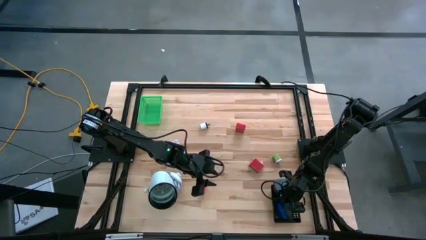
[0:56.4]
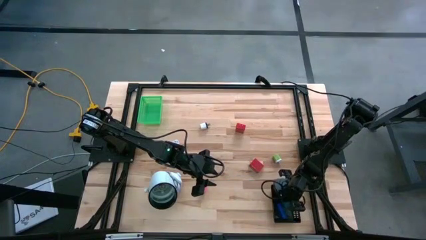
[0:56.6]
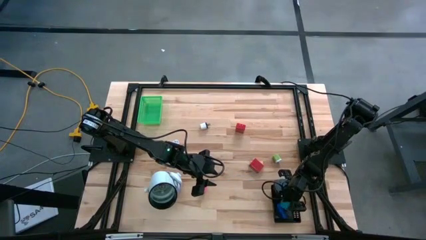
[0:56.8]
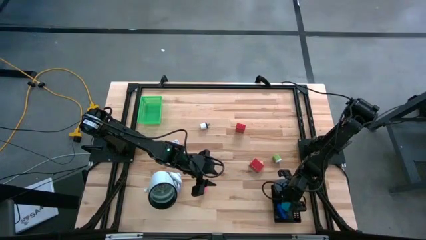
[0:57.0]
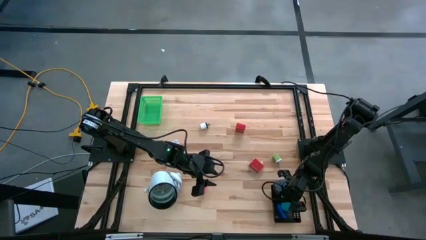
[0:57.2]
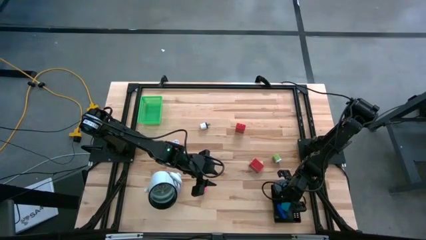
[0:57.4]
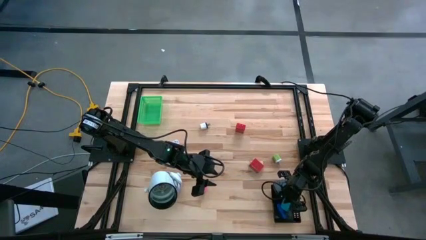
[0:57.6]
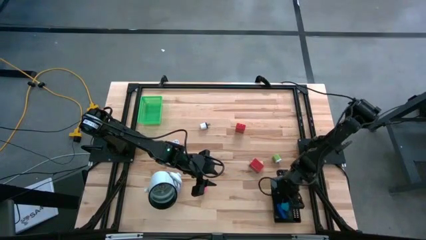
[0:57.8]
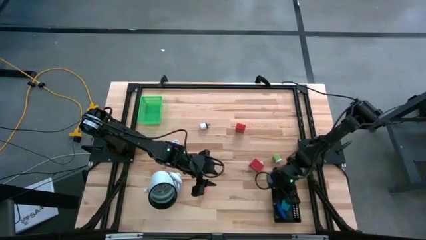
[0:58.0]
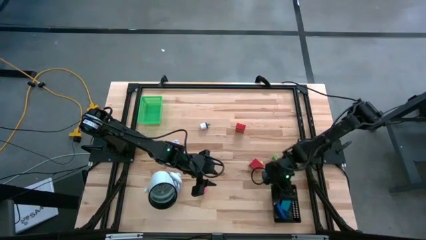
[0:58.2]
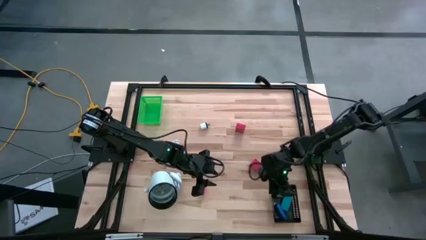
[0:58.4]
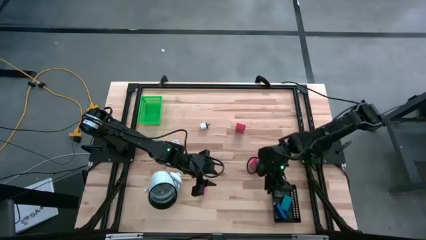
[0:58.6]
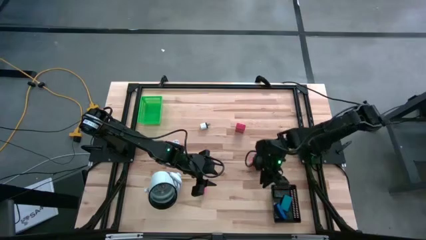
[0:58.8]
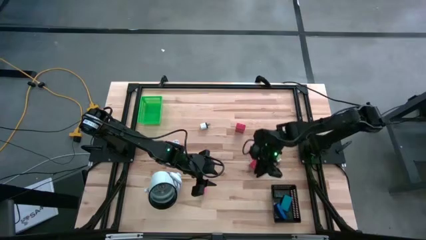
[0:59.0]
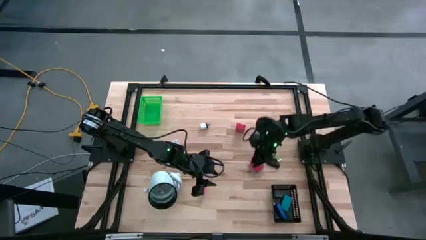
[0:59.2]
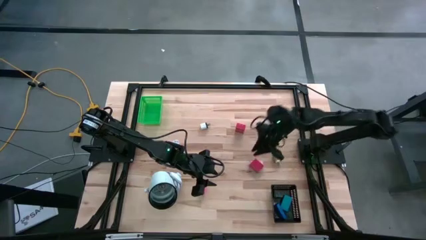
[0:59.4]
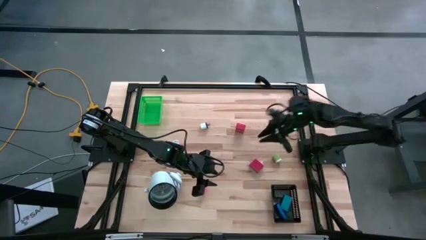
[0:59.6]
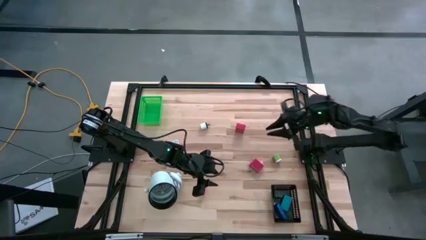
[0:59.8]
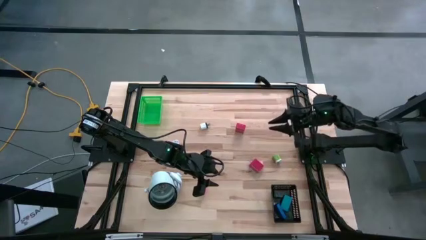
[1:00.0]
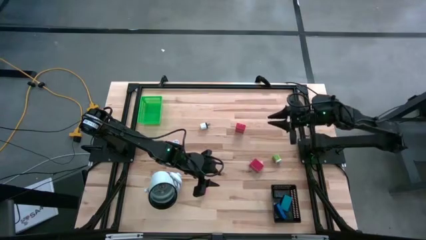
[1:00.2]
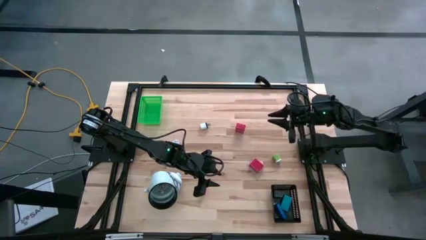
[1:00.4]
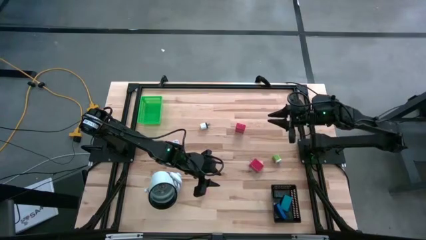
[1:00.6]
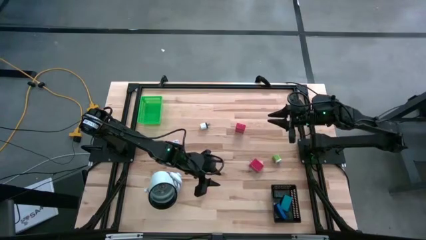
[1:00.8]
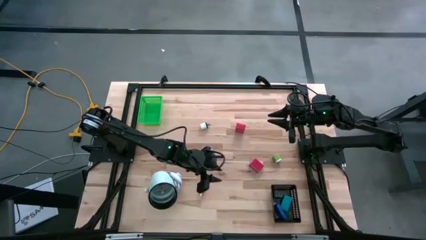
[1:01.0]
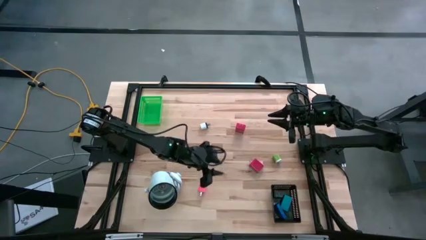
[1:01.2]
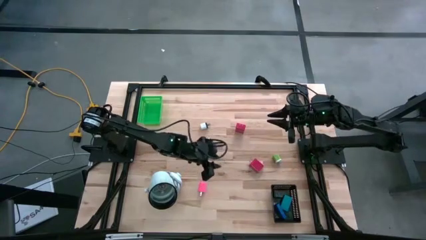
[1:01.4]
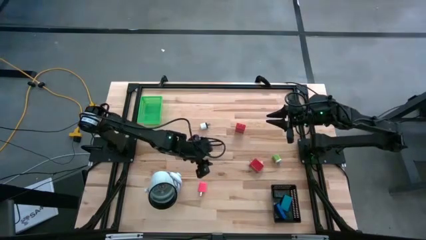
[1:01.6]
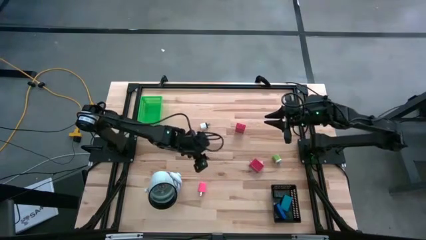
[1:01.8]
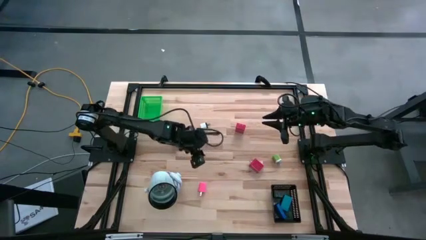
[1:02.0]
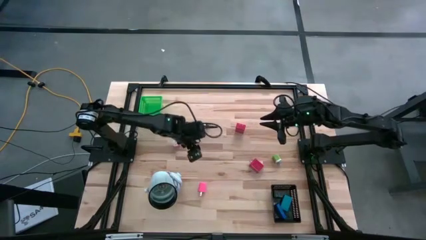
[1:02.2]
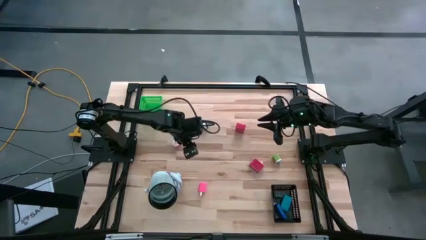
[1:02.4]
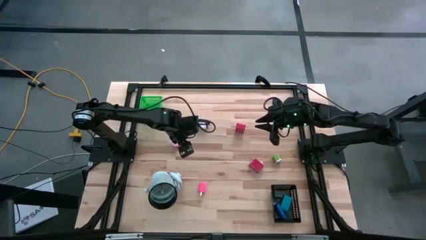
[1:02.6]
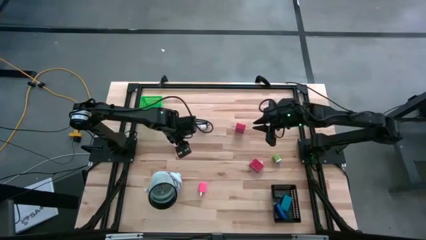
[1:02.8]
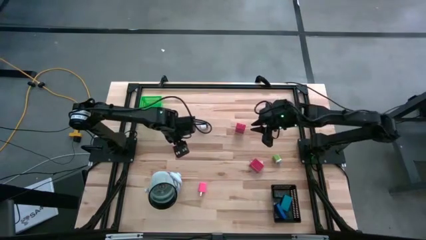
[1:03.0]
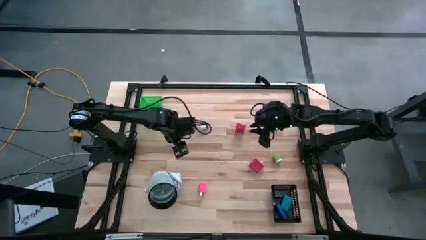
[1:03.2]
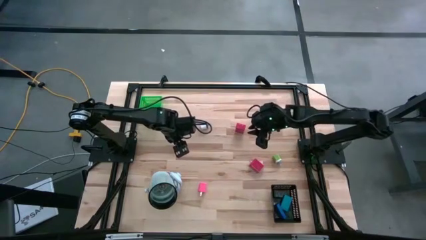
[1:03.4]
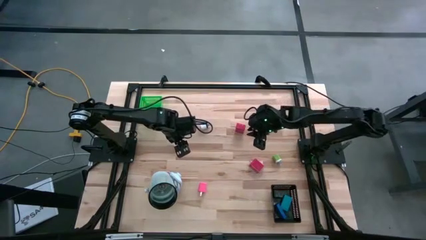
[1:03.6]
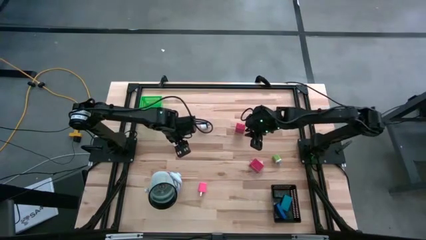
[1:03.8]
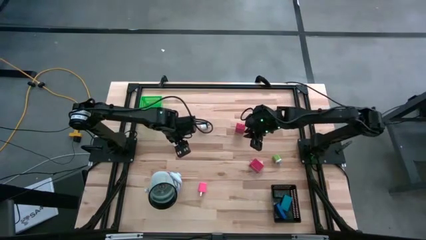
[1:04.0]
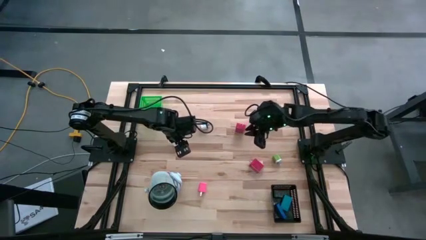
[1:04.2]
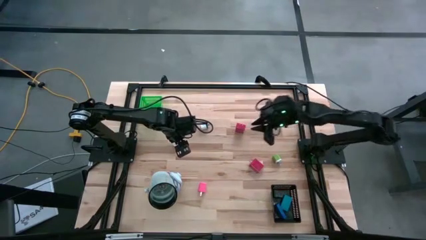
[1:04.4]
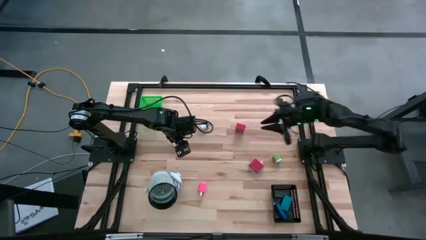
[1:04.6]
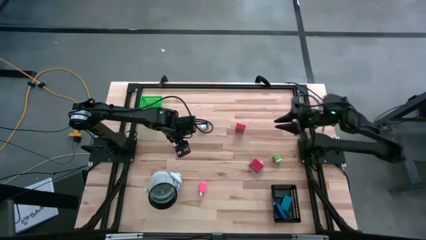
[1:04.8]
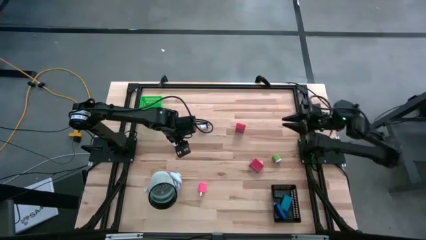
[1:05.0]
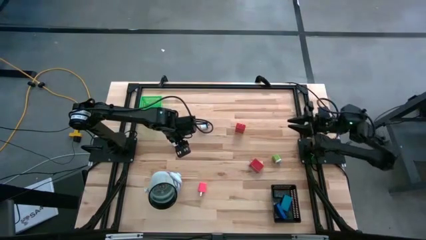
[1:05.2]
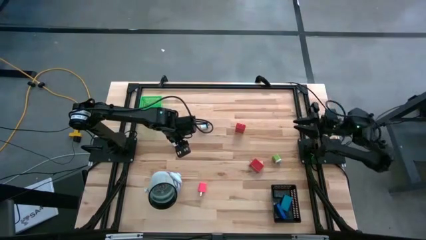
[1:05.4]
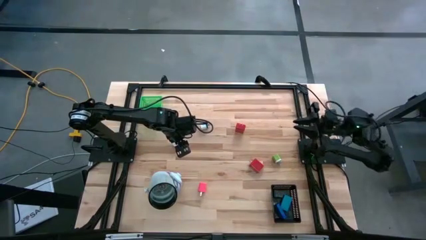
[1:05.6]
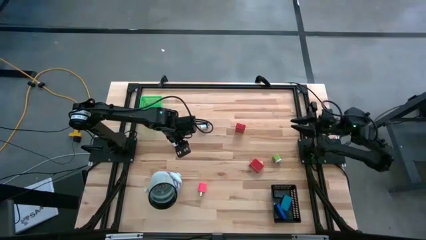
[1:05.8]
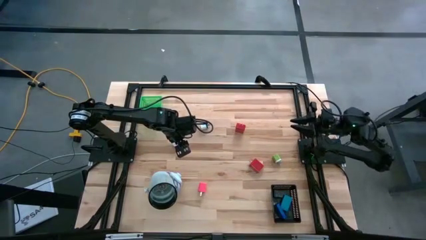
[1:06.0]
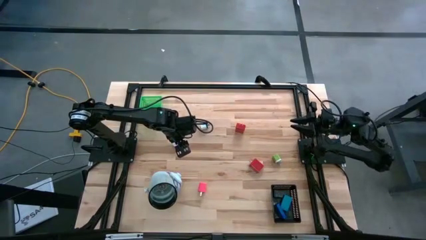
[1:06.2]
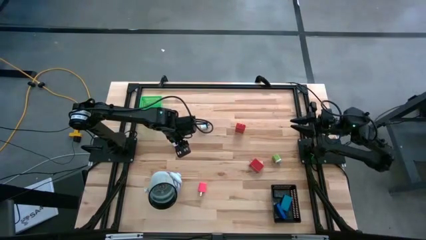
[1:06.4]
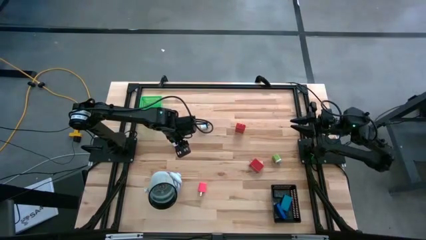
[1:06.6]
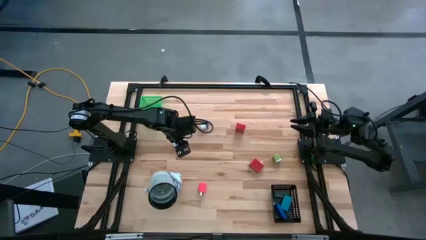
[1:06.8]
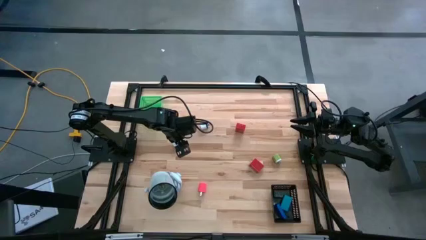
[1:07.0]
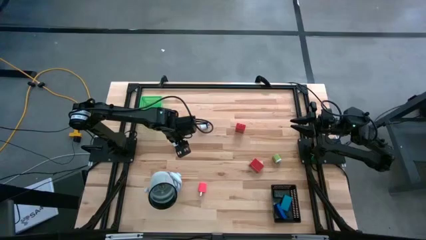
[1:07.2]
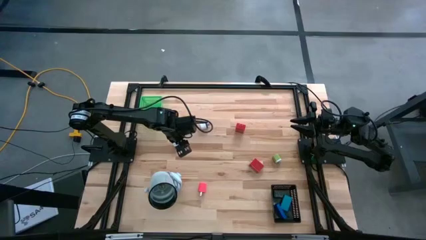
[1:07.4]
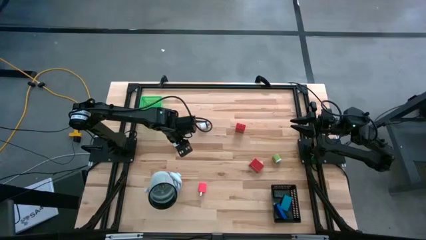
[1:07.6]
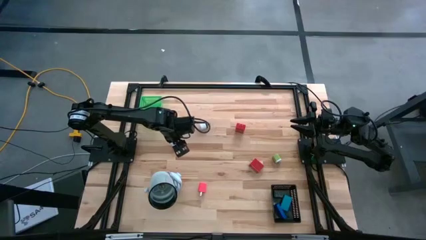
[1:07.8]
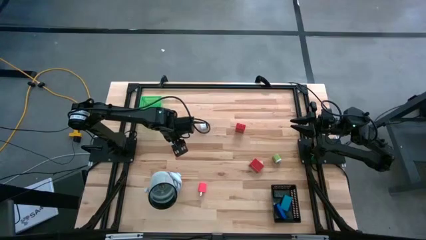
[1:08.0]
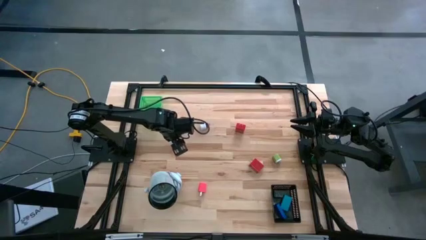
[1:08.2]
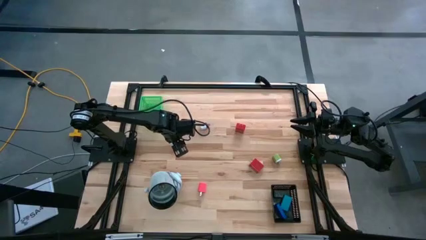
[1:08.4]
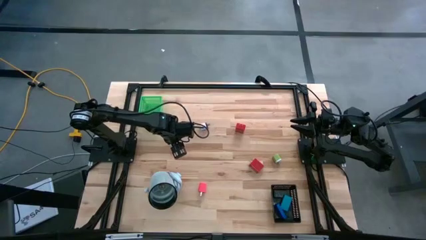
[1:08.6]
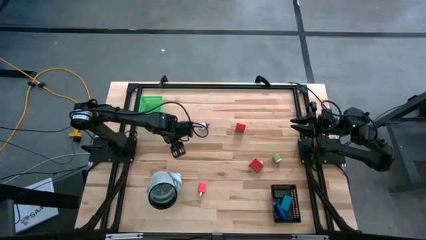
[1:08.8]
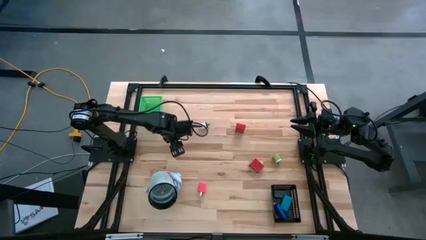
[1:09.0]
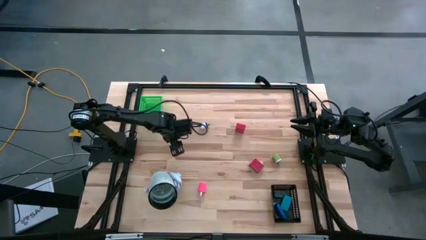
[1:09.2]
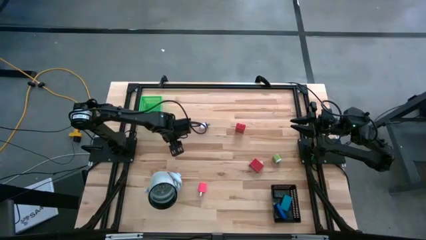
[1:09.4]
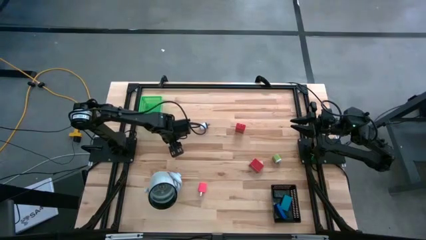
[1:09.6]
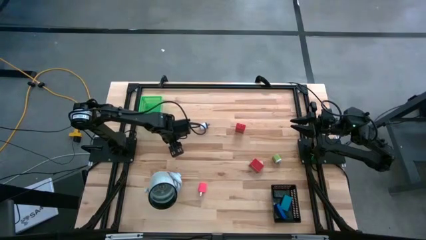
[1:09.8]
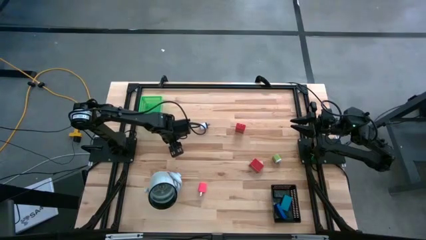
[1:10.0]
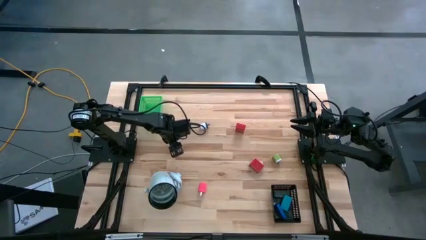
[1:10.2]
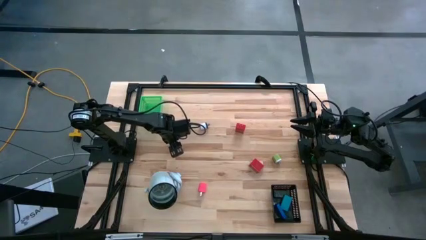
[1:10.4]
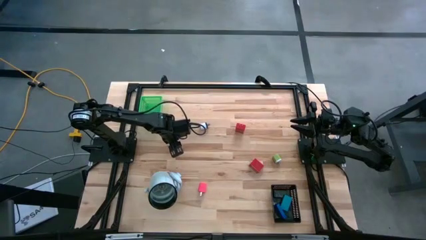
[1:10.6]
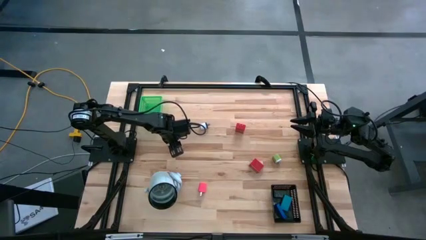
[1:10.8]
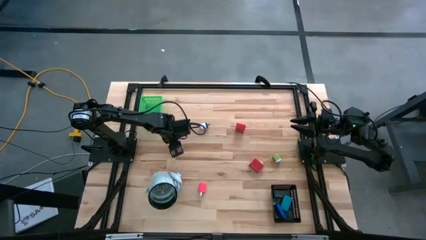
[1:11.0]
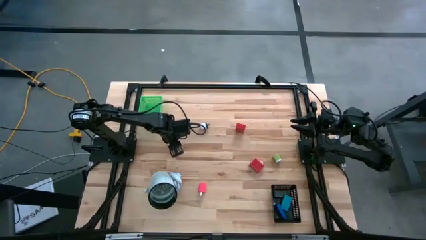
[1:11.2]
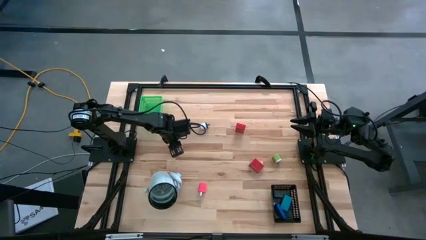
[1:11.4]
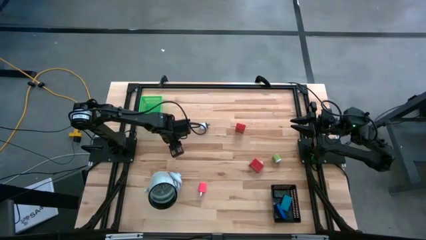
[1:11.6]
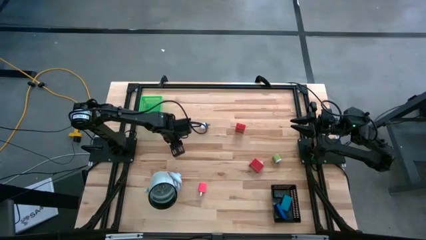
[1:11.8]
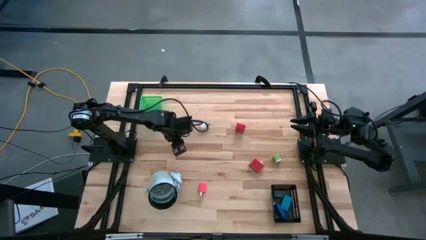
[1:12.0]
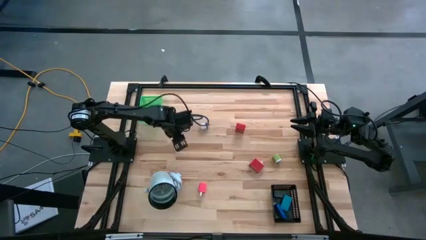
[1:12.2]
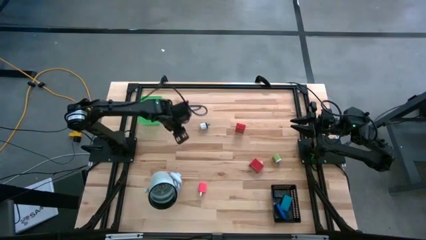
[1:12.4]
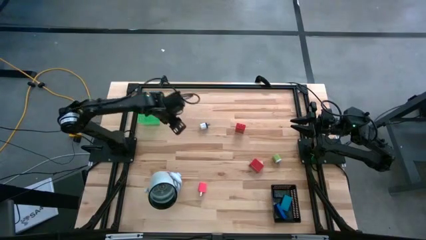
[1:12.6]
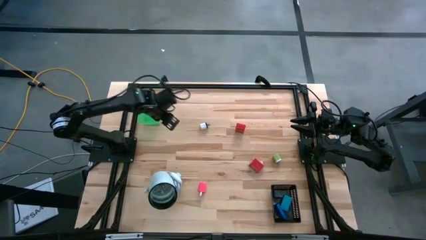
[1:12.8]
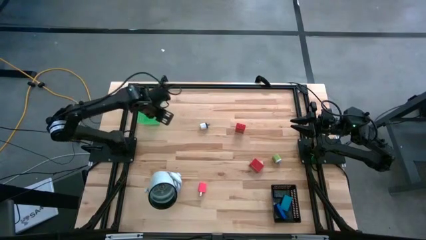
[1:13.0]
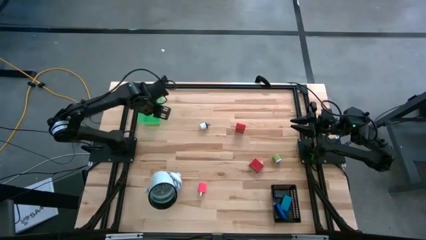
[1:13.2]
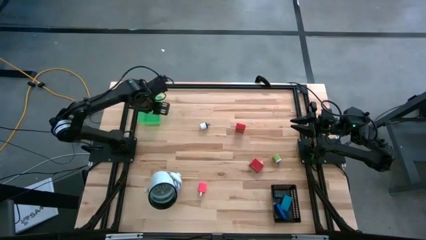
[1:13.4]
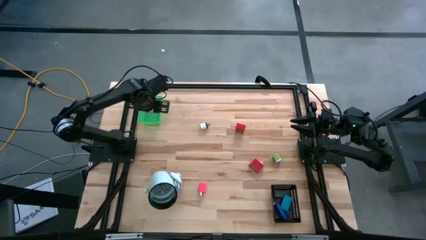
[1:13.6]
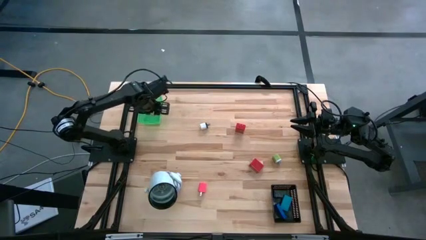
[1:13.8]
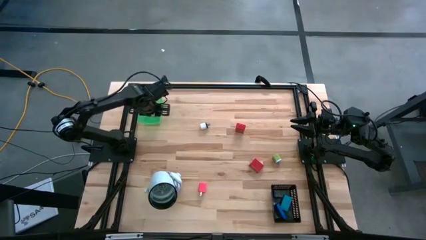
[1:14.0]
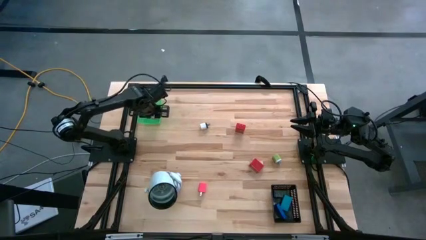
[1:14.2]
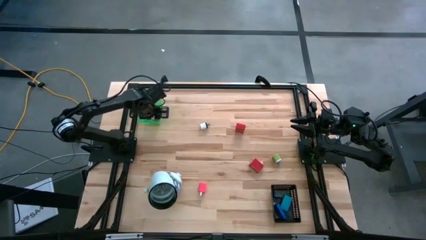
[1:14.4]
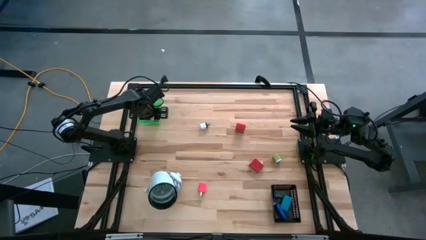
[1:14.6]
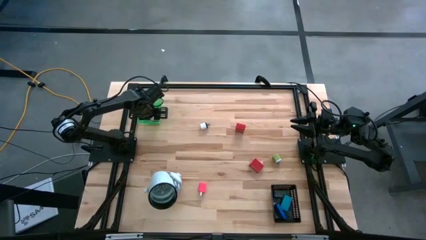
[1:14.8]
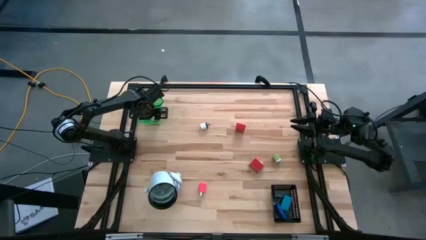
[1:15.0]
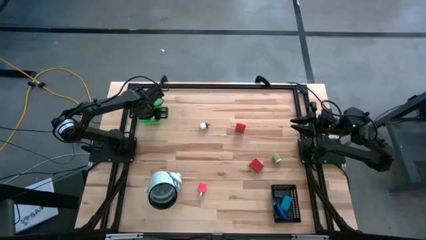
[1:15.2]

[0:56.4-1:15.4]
Task: Pick & Place Office items
Put the pink white charger adapter into the green bin
